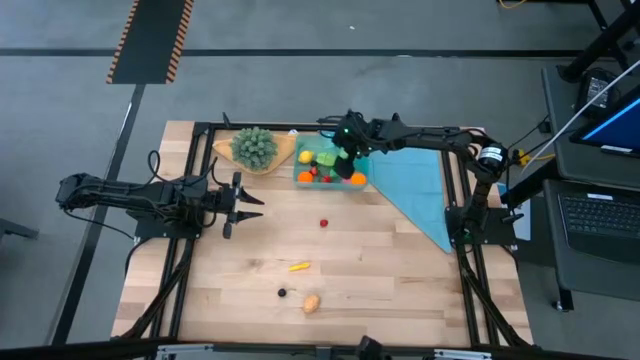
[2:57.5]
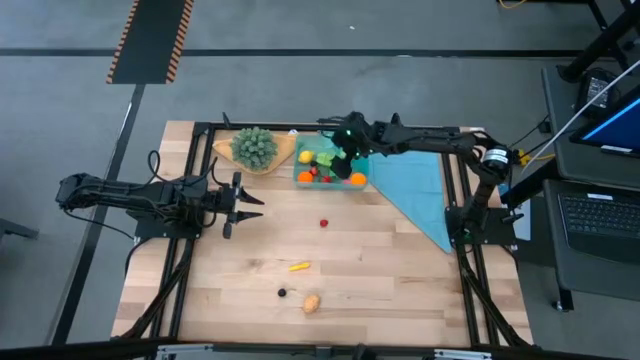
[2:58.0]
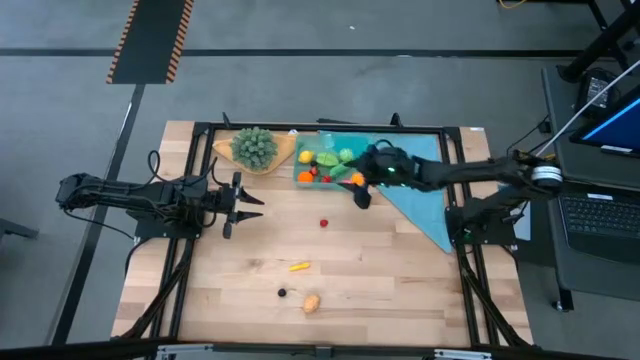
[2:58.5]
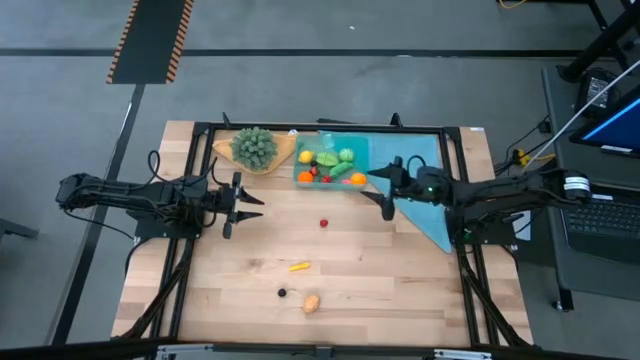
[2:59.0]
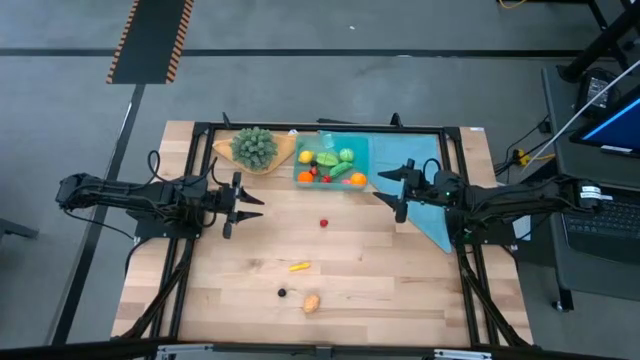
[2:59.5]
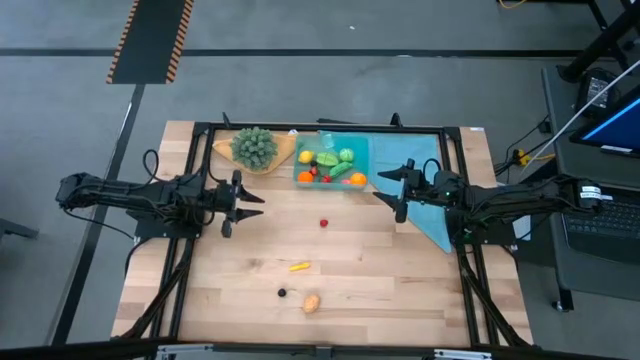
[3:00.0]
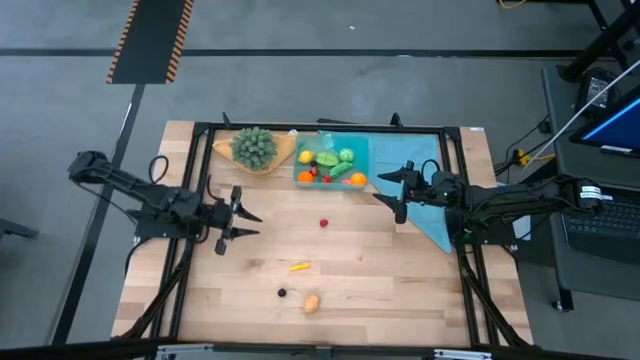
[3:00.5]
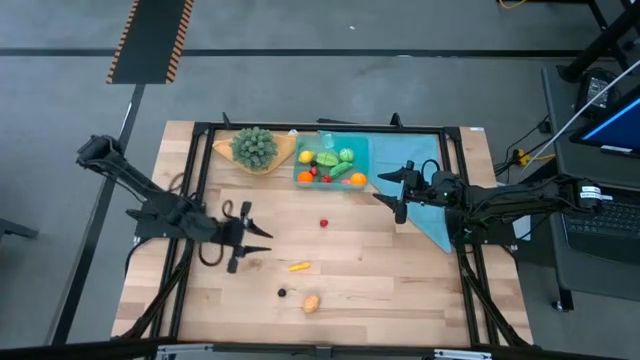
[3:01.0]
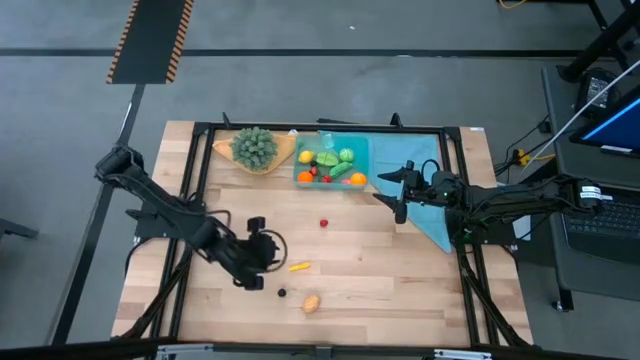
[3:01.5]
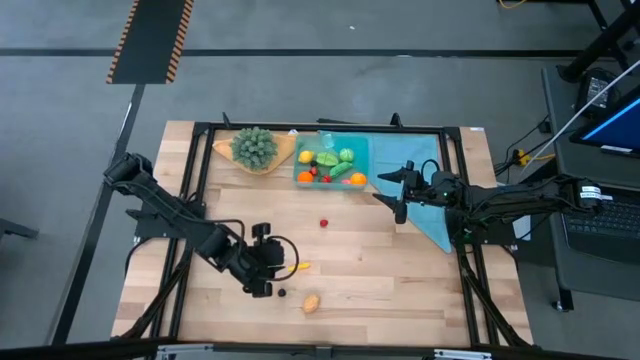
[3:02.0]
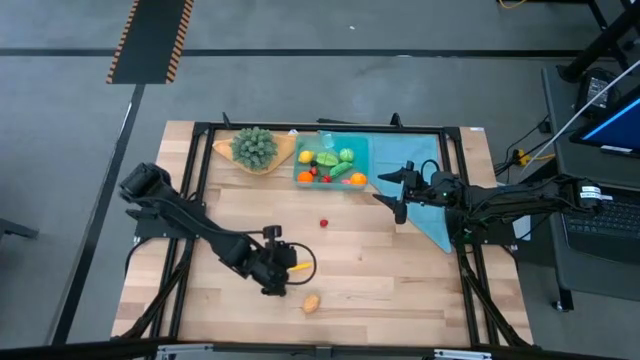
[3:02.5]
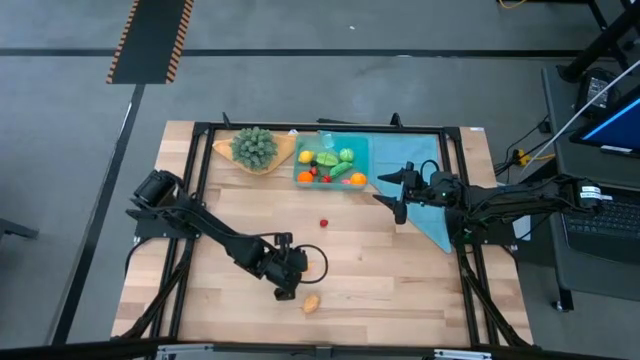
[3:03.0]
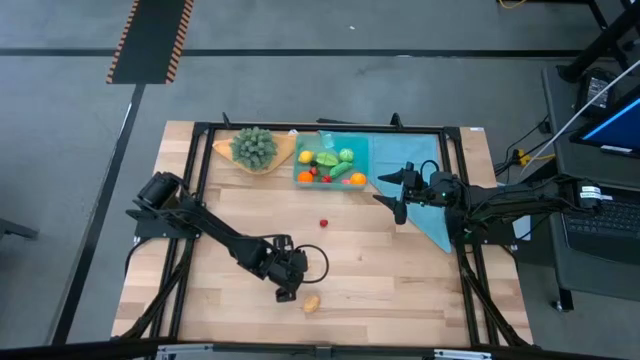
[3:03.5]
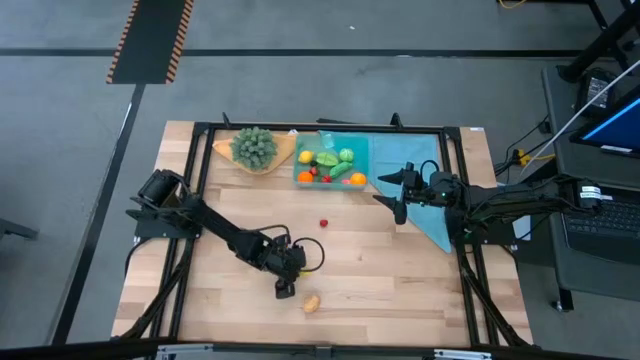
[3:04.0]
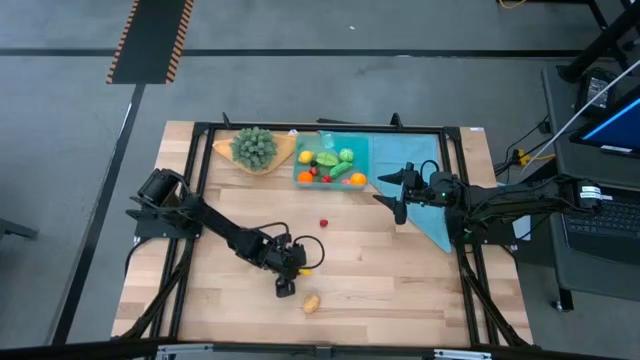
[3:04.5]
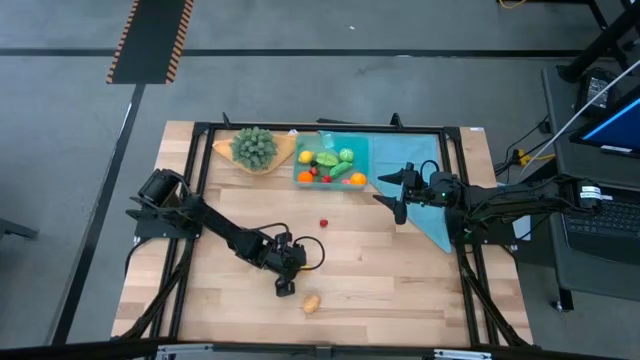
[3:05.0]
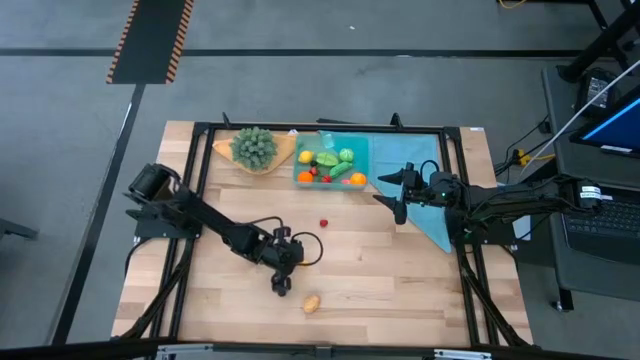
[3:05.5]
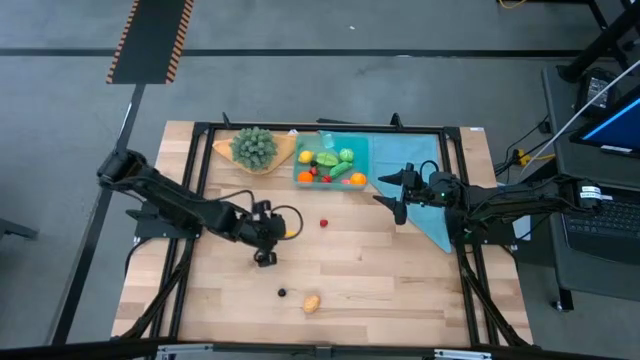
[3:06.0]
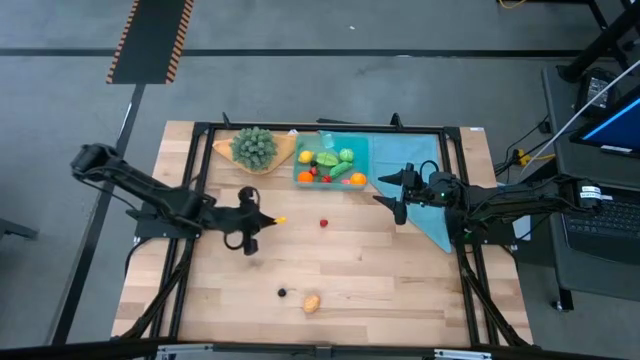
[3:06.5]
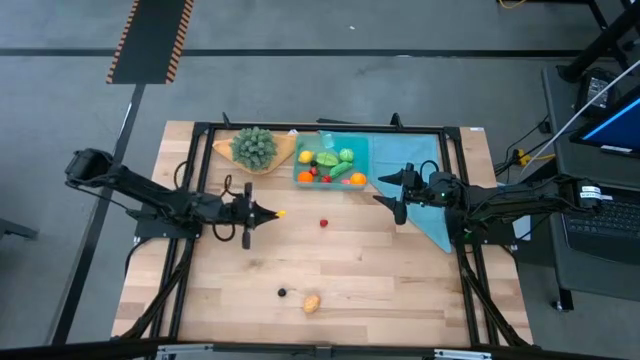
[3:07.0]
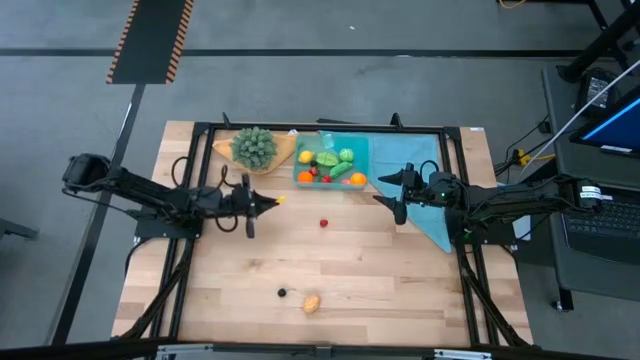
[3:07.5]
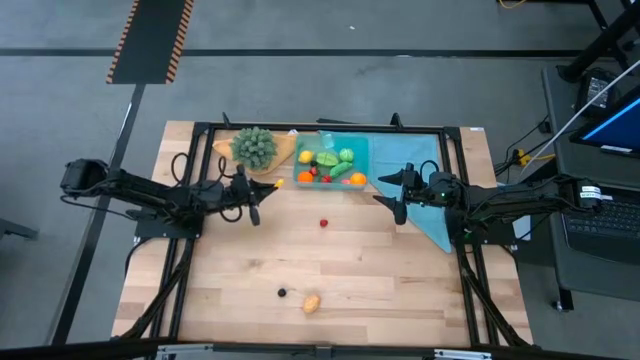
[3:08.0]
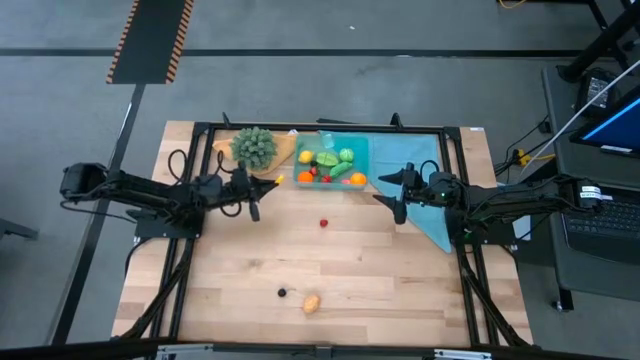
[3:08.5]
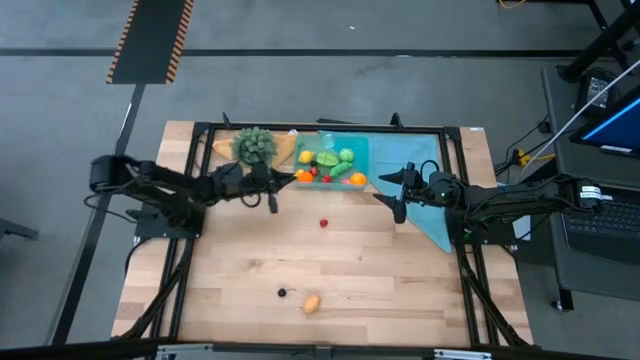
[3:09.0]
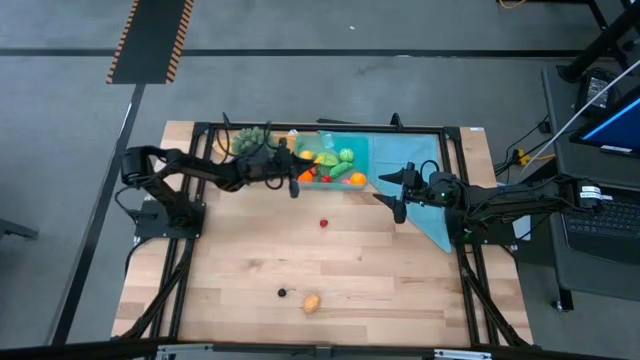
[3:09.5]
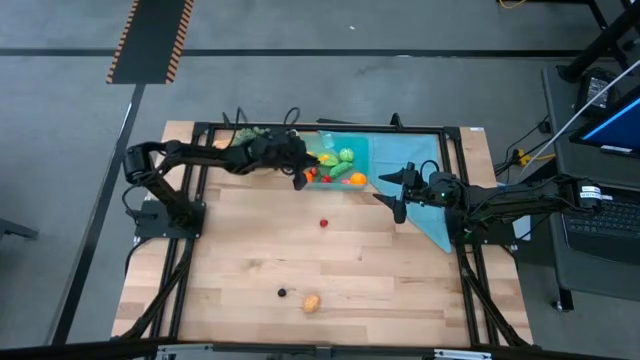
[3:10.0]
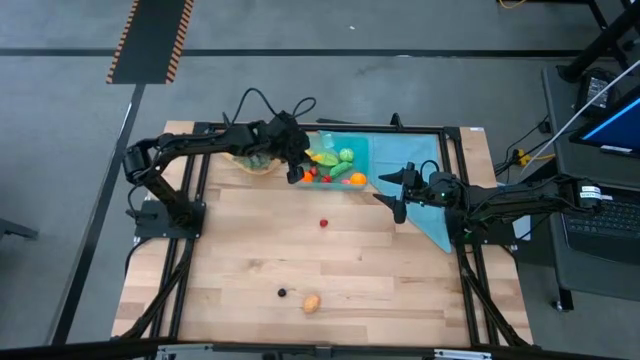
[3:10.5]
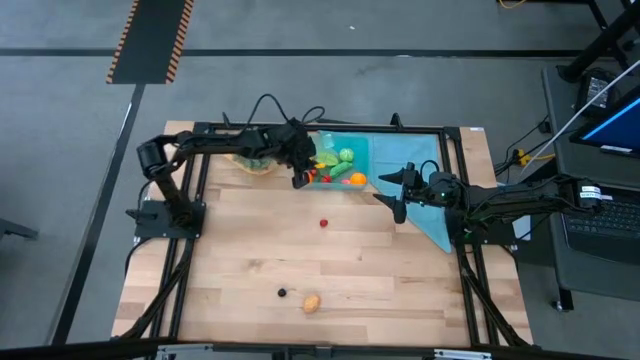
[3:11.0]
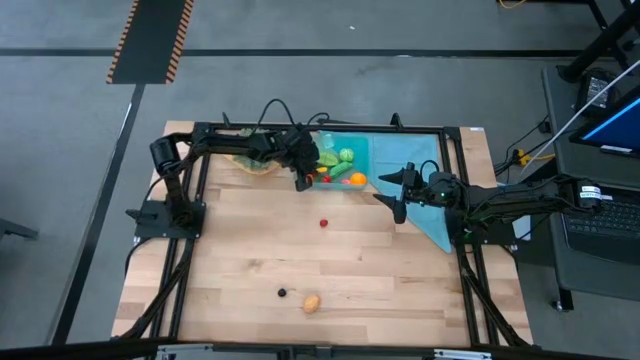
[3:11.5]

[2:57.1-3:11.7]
Task: Pick and placing Produce into tupperware
Put the banana pepper into the blue bin
